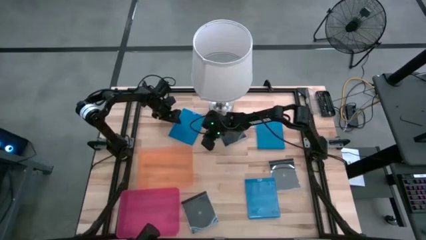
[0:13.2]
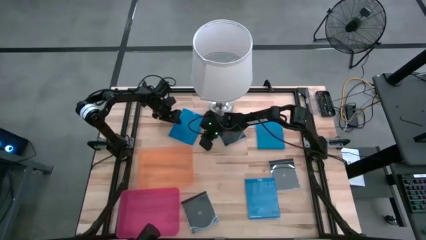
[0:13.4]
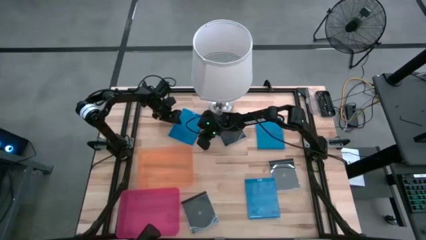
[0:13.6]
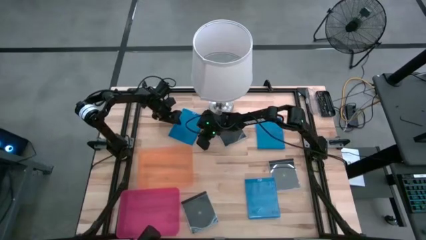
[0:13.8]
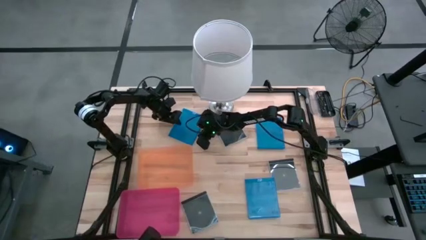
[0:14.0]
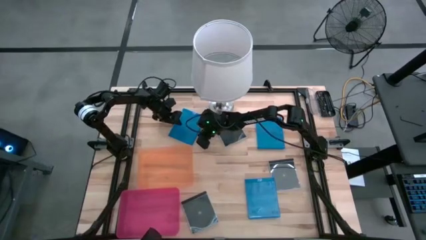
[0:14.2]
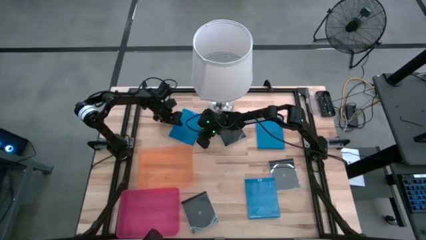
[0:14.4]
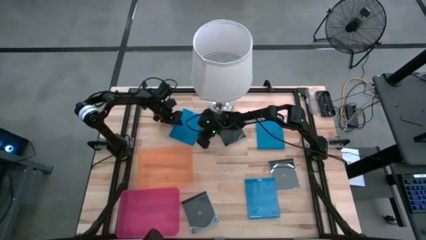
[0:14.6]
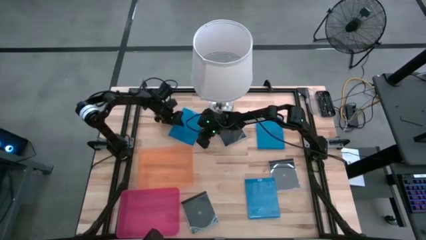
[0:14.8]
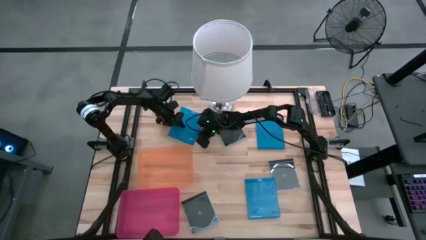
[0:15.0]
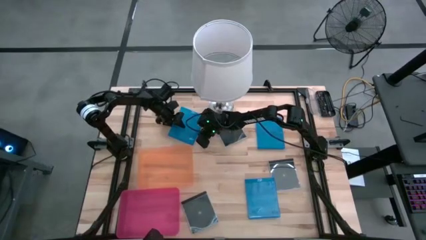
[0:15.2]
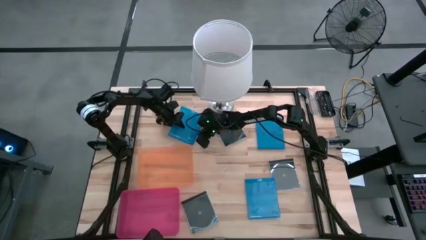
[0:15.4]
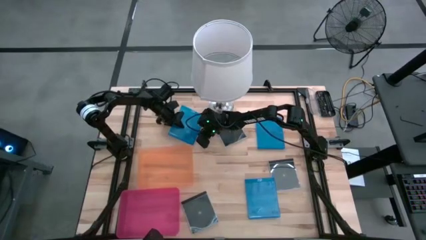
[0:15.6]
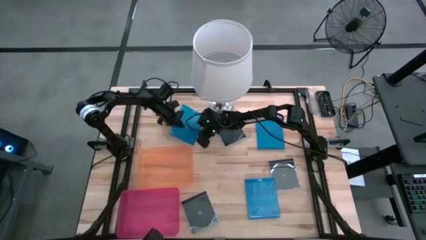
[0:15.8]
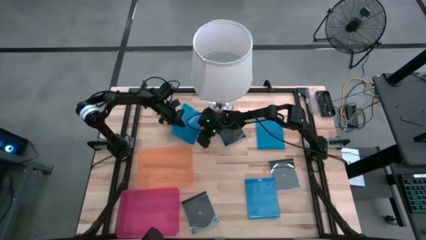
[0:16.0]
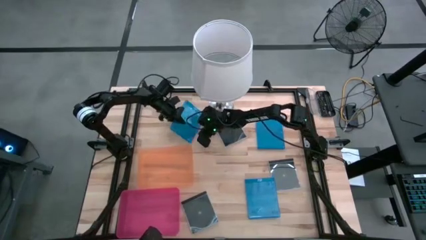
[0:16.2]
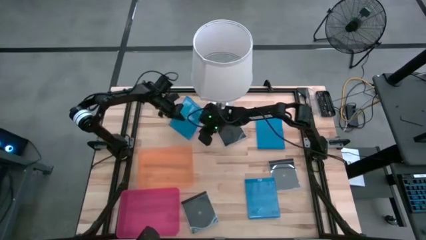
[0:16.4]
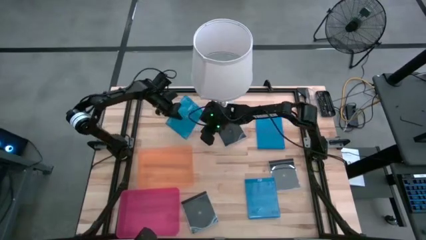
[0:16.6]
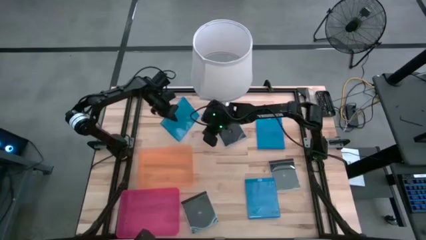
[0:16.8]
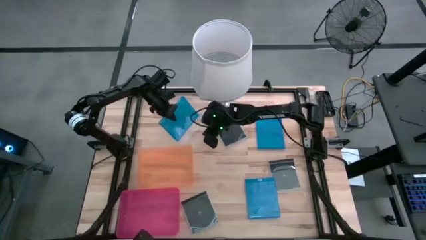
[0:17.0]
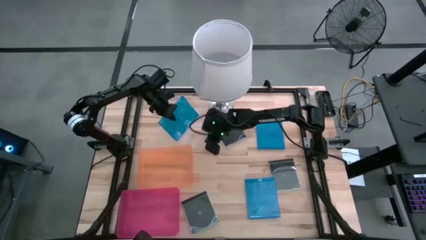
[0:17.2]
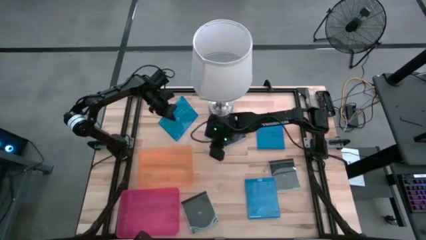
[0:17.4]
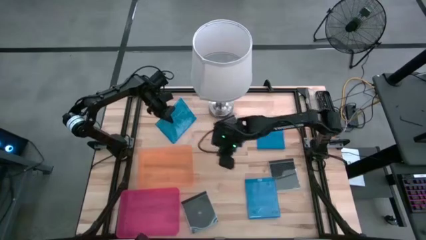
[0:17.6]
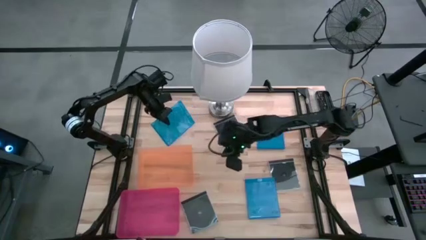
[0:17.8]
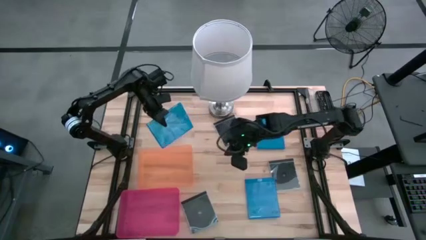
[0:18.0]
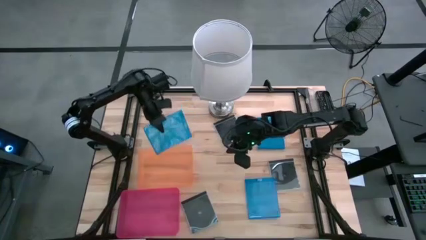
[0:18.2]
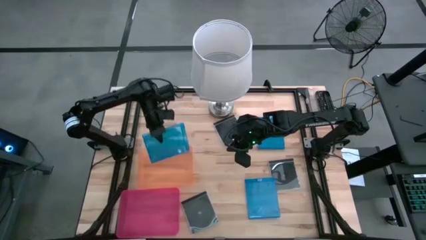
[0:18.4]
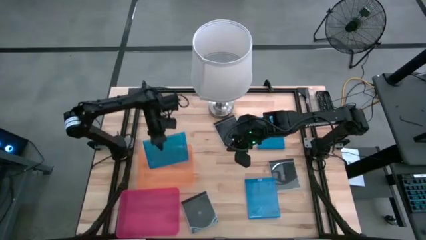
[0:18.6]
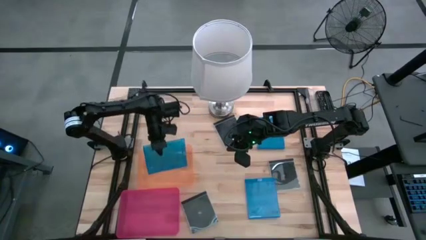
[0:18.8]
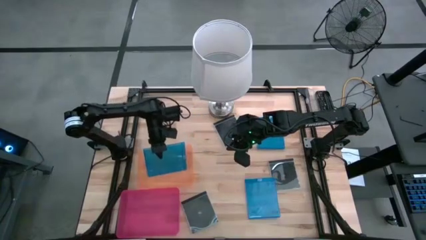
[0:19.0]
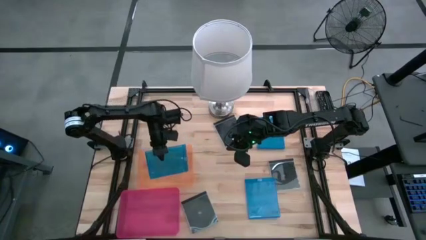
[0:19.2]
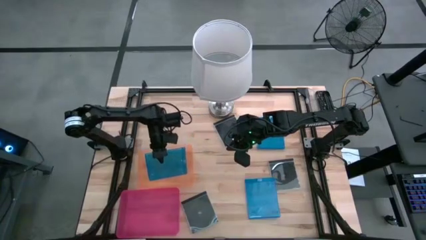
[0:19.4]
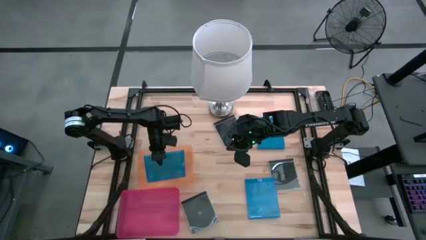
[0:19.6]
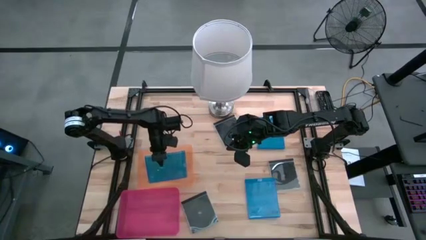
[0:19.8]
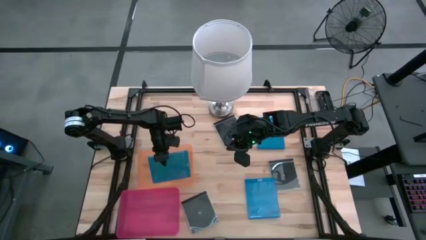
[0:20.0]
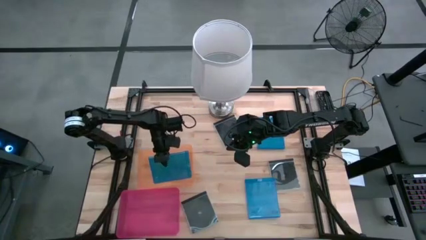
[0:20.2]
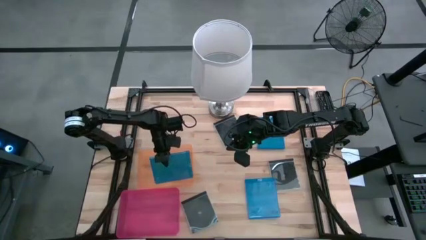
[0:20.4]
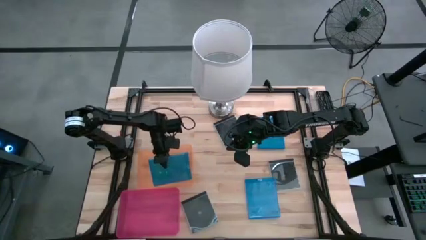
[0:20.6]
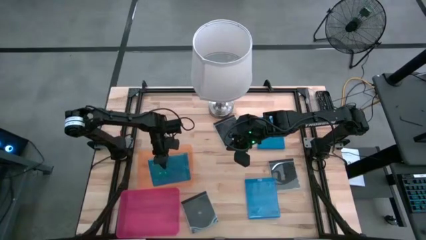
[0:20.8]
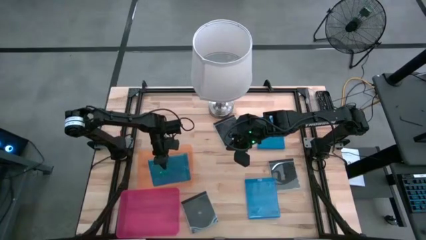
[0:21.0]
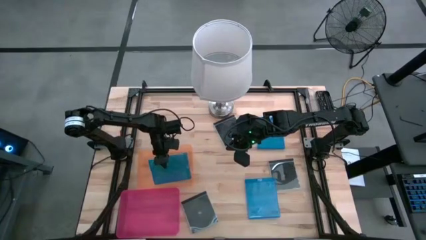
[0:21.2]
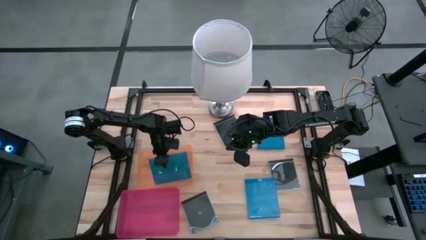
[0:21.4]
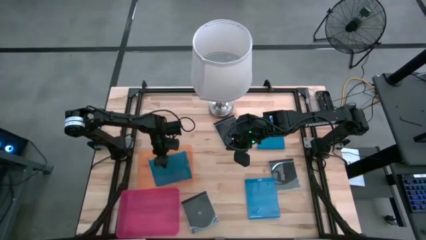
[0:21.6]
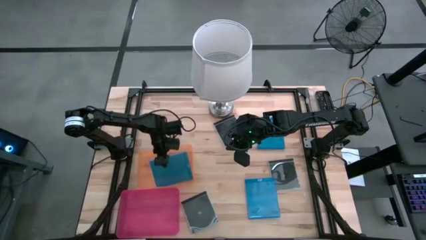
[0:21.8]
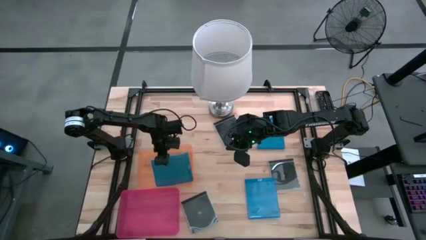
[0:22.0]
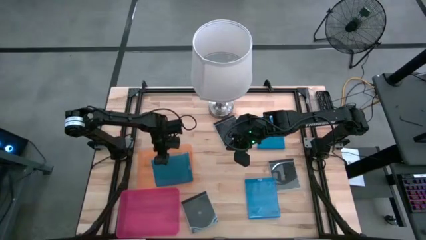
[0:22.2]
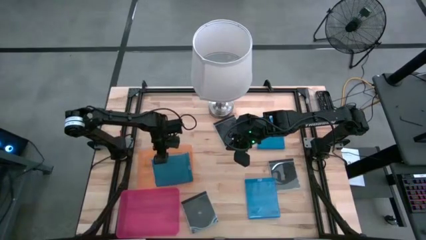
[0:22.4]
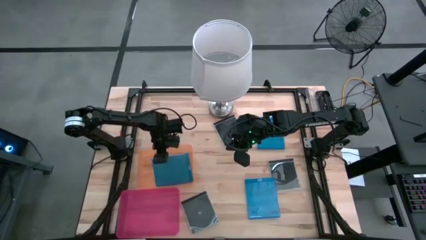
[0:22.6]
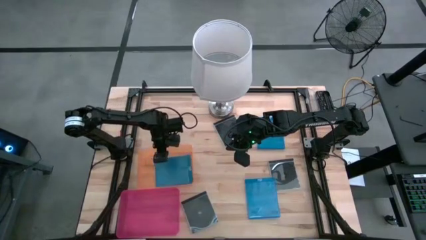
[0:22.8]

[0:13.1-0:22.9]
Task: Pick & place jewel cases by type
Put the top left blue cd case into the orange bin

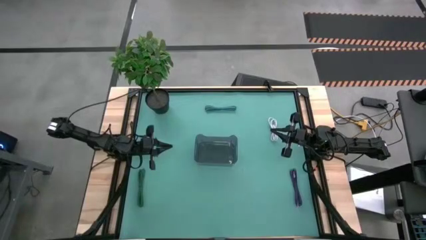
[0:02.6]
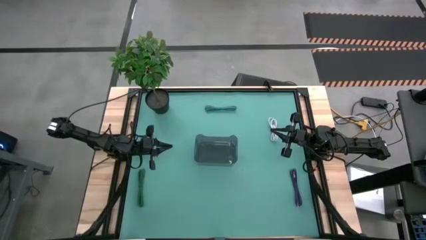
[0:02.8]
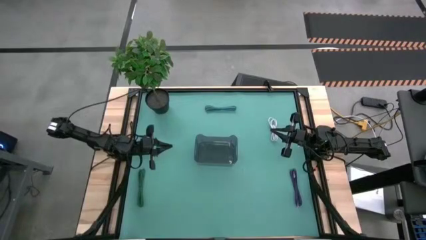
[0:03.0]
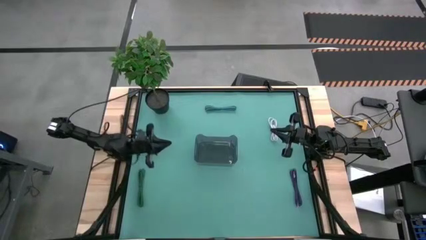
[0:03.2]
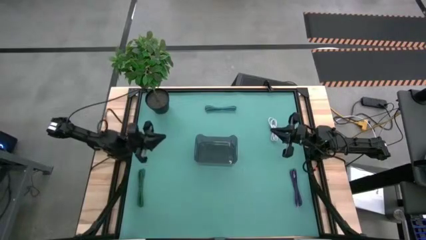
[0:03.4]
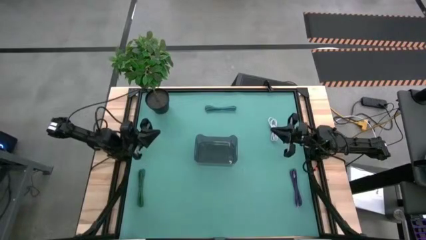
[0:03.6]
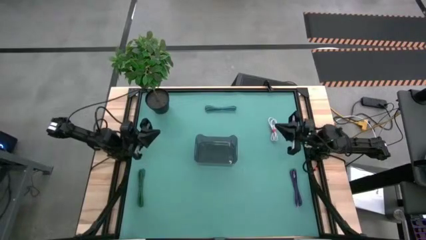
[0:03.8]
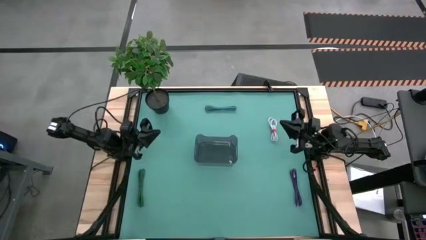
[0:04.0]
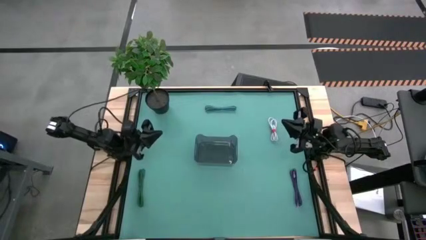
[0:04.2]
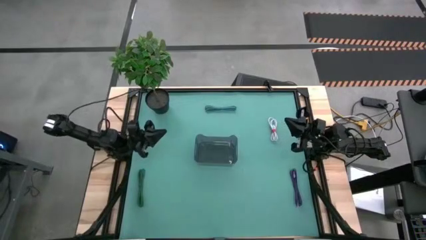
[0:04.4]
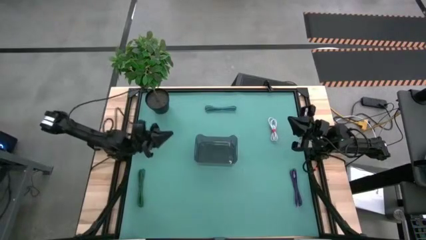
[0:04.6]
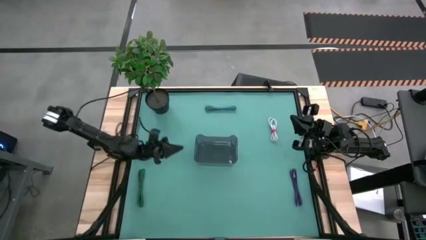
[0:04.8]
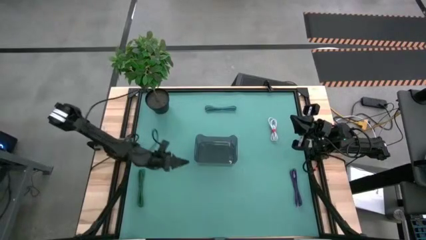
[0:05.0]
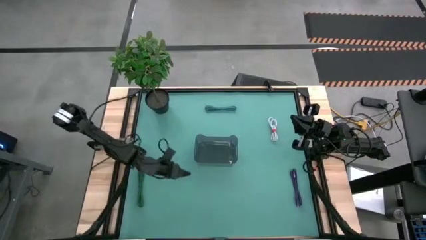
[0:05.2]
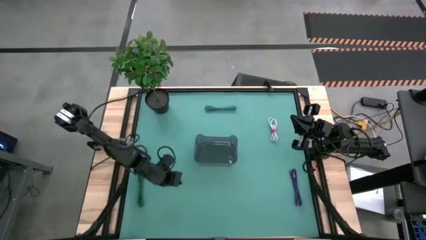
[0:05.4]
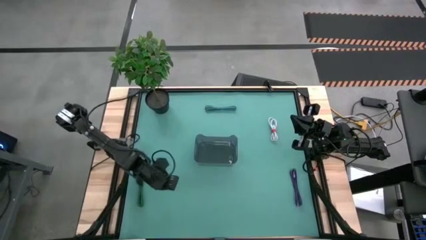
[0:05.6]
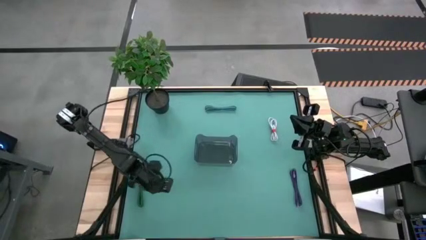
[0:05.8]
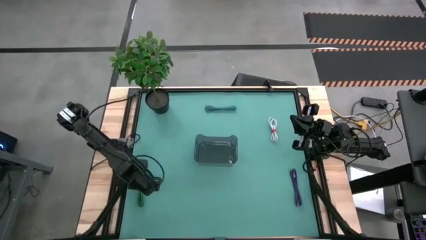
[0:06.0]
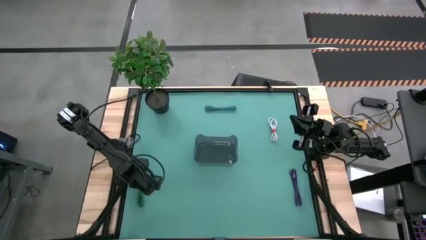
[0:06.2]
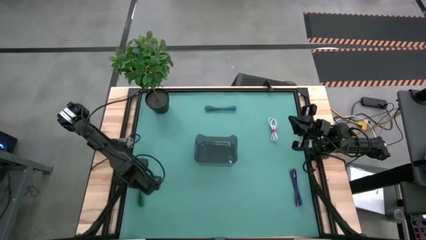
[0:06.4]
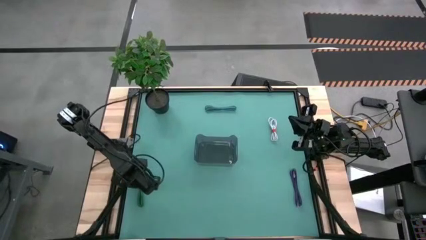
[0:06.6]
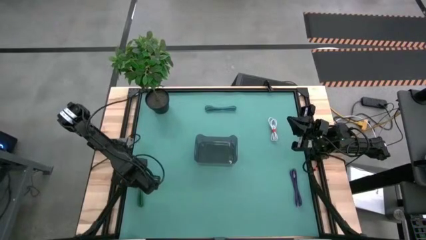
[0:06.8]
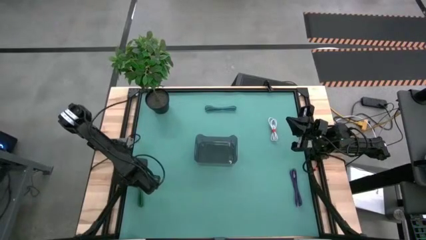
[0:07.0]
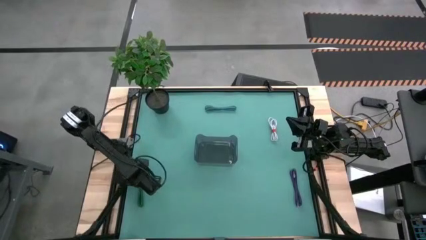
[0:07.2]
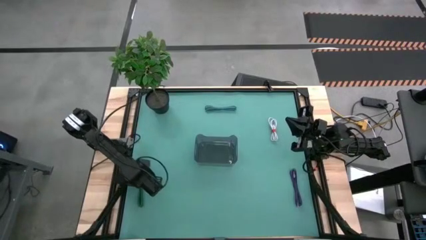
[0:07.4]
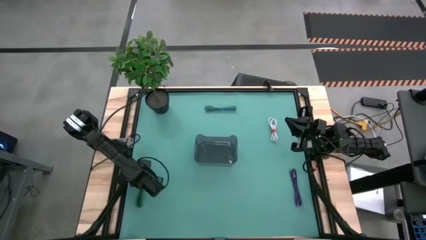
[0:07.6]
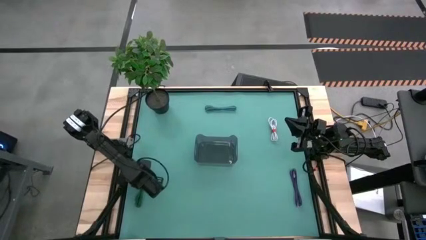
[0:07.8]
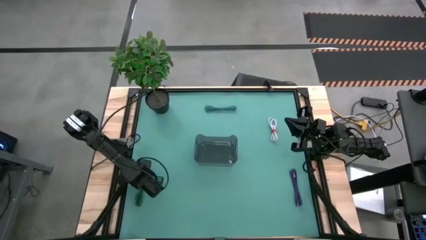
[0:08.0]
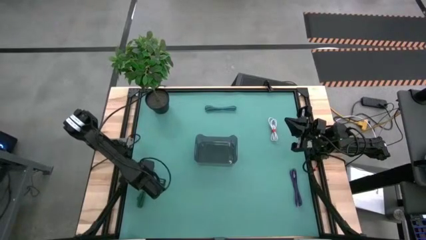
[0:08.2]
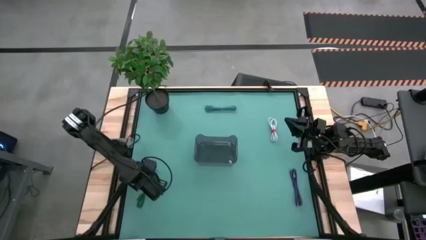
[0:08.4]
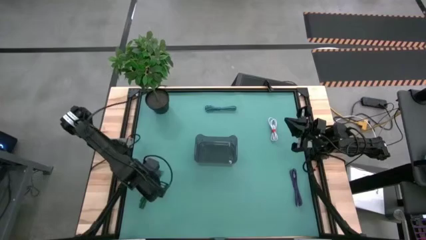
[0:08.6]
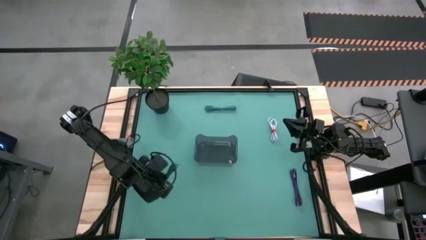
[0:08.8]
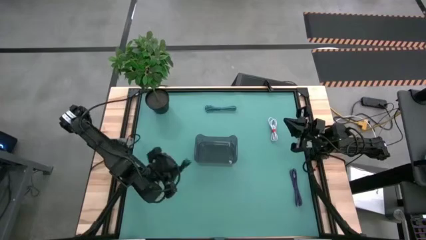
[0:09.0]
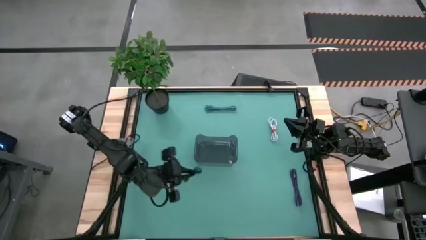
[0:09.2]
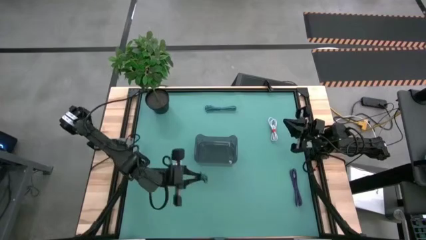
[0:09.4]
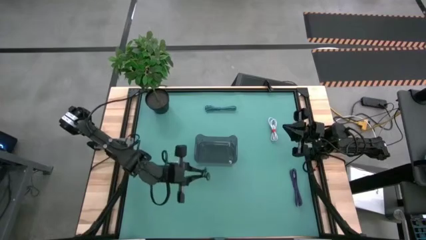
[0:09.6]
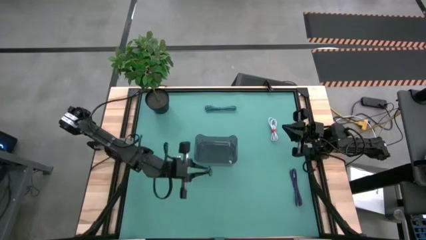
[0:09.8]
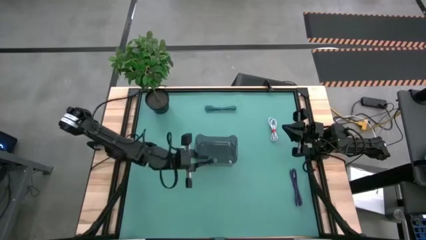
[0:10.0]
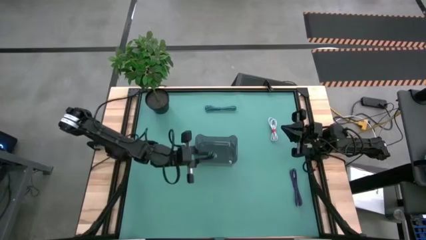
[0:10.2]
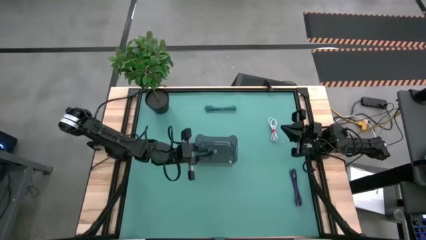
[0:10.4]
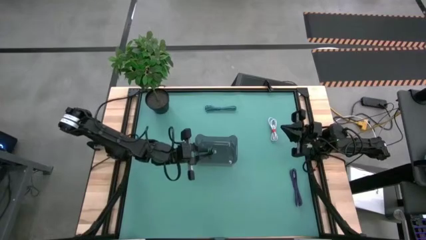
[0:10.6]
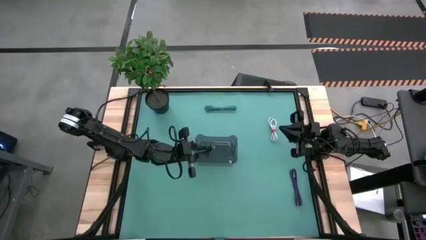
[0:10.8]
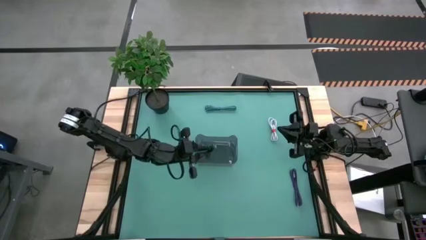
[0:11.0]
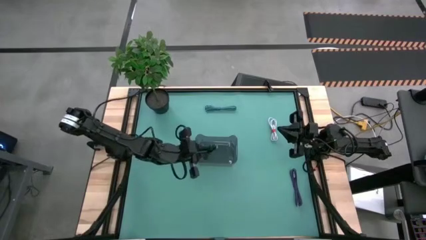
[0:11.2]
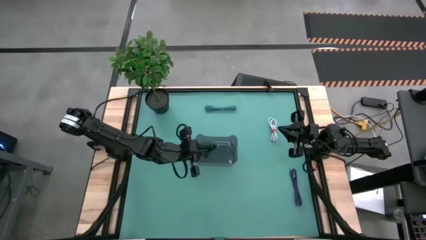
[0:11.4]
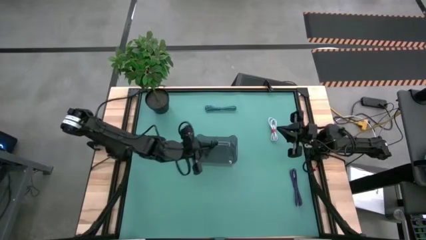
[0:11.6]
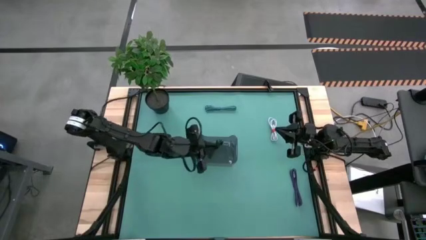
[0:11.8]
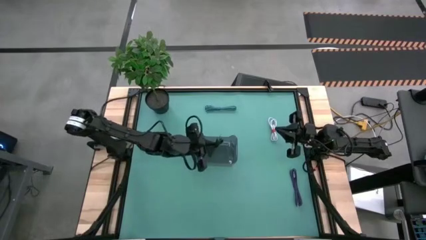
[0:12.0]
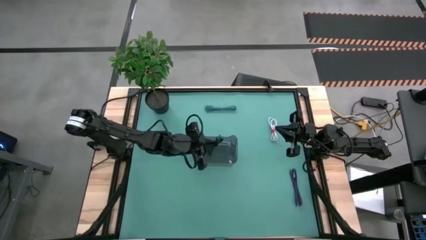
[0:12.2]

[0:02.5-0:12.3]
Task: Pick and place USB-C Cables
Put the green cable into the black transparent container
